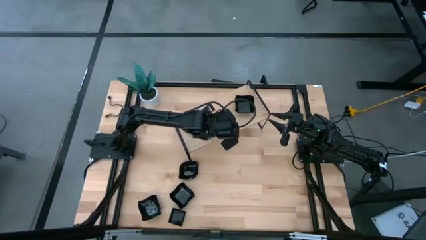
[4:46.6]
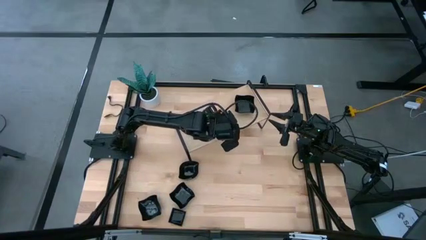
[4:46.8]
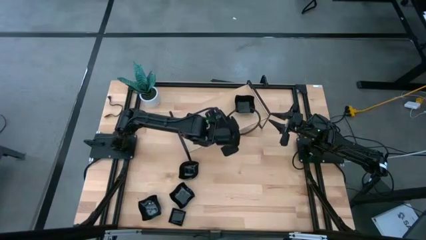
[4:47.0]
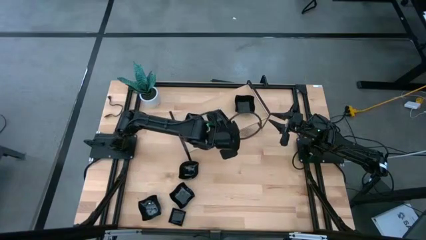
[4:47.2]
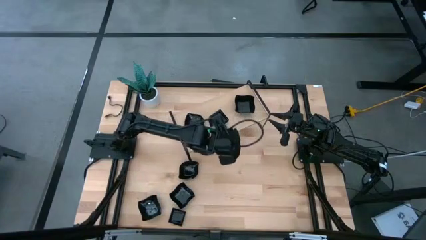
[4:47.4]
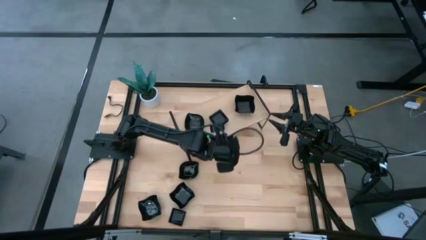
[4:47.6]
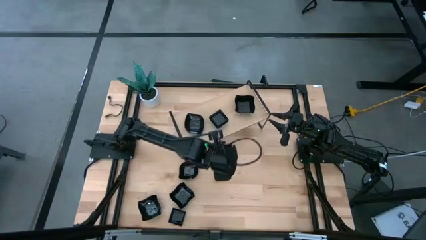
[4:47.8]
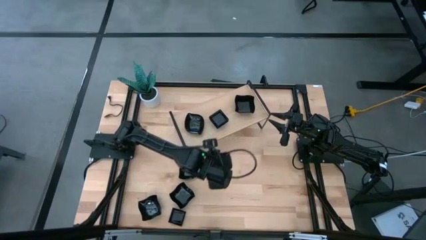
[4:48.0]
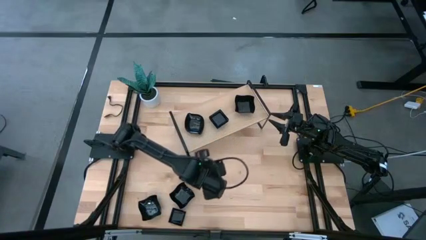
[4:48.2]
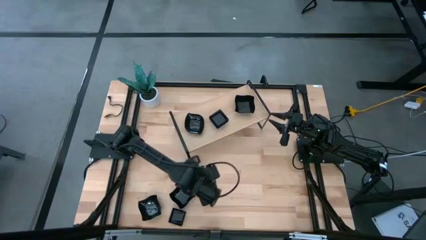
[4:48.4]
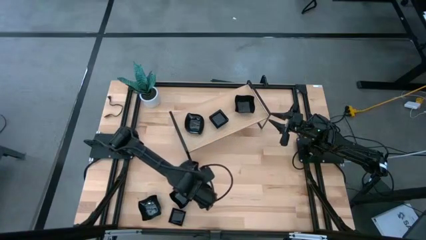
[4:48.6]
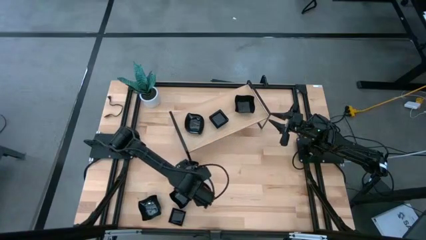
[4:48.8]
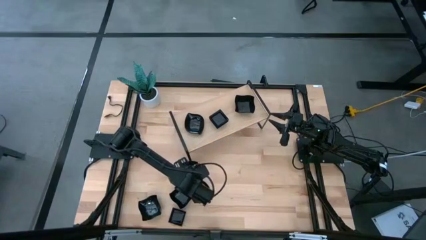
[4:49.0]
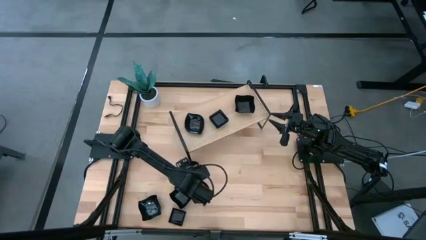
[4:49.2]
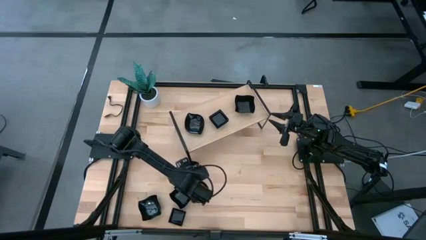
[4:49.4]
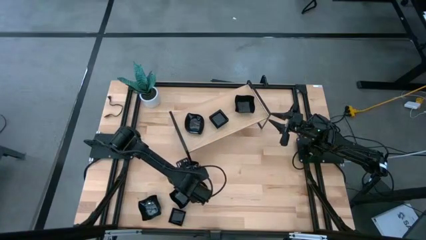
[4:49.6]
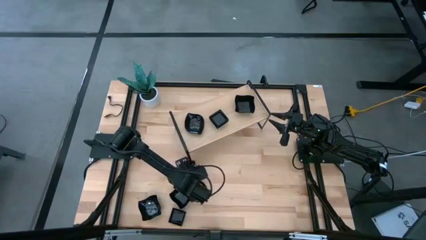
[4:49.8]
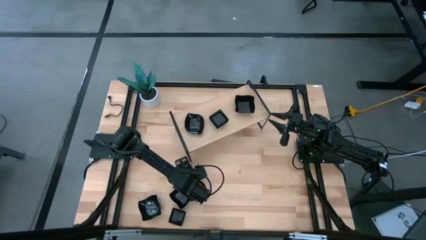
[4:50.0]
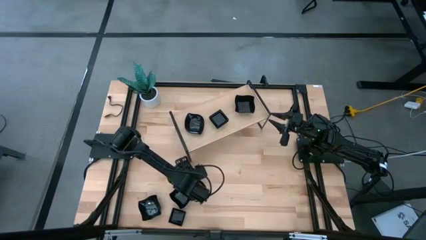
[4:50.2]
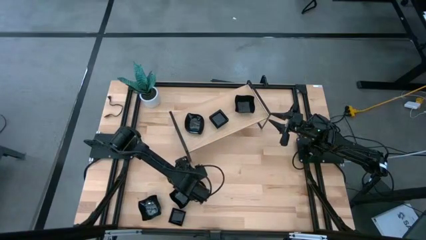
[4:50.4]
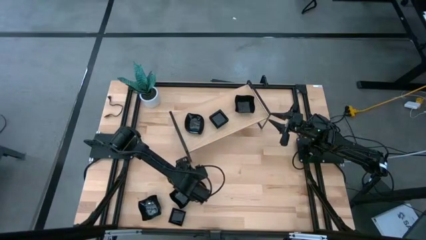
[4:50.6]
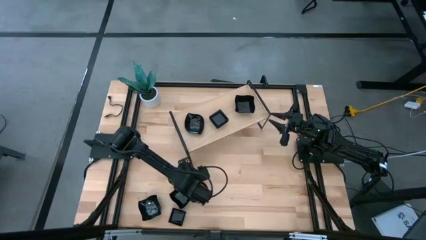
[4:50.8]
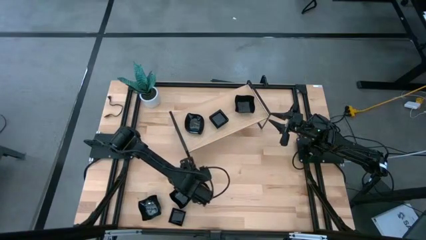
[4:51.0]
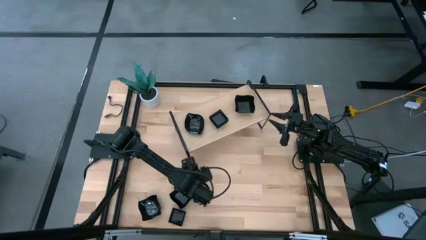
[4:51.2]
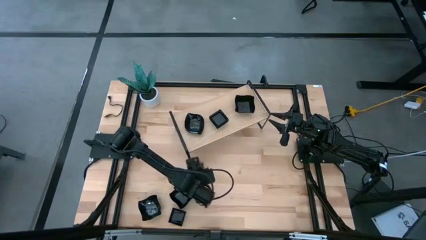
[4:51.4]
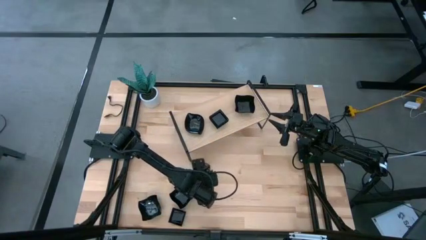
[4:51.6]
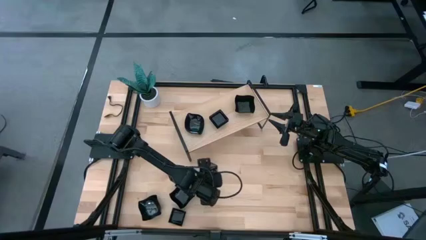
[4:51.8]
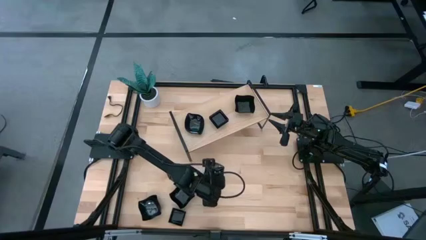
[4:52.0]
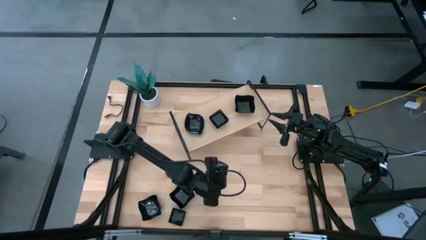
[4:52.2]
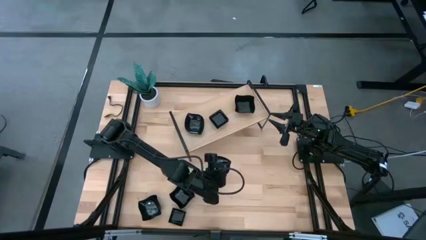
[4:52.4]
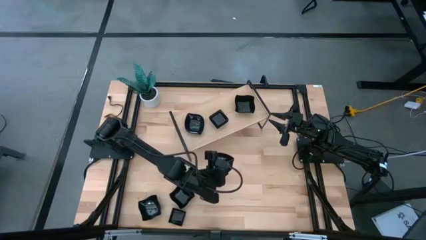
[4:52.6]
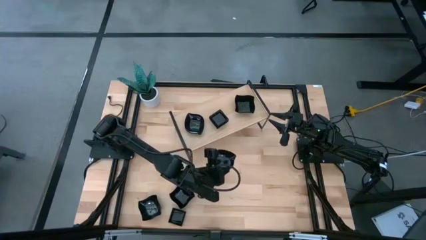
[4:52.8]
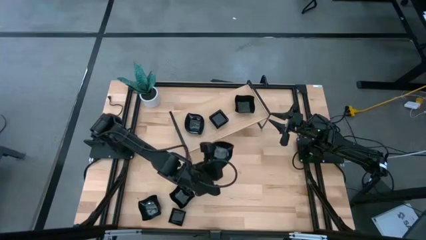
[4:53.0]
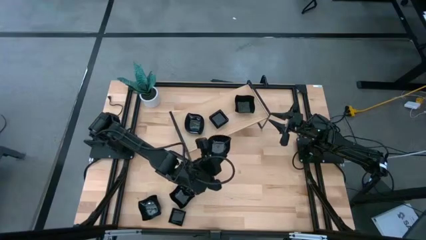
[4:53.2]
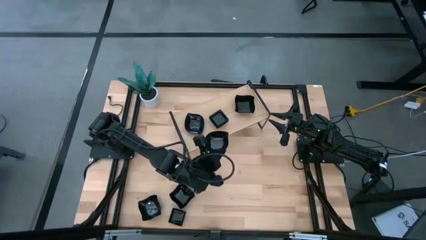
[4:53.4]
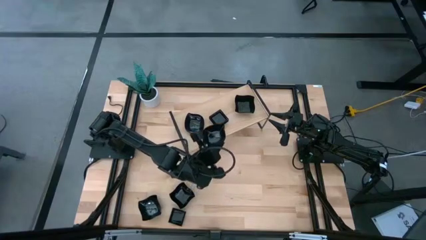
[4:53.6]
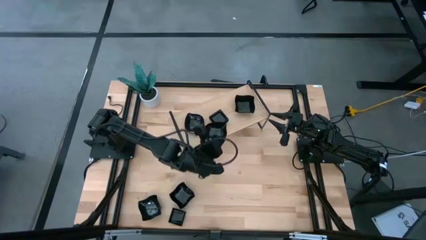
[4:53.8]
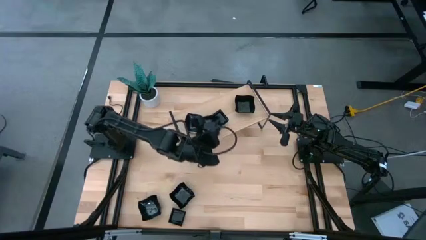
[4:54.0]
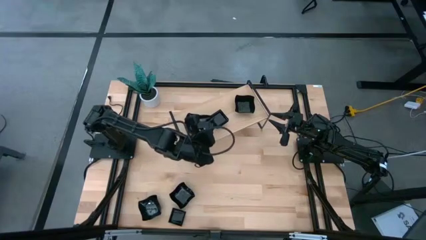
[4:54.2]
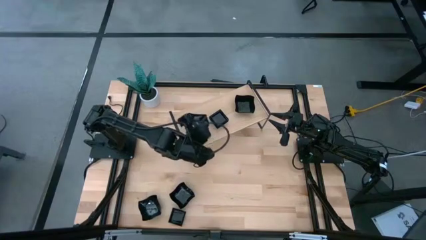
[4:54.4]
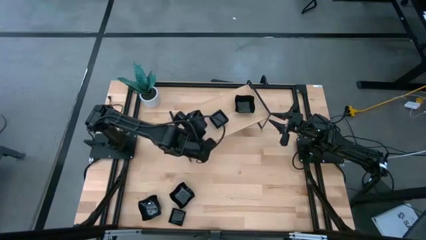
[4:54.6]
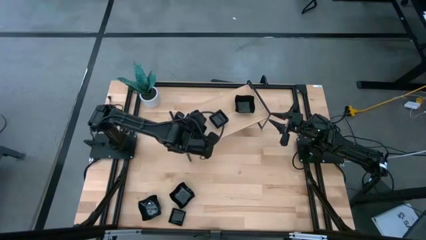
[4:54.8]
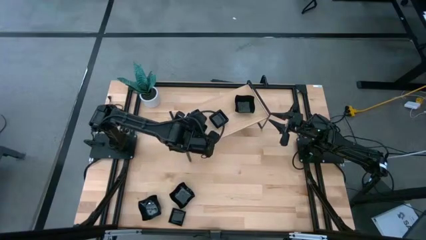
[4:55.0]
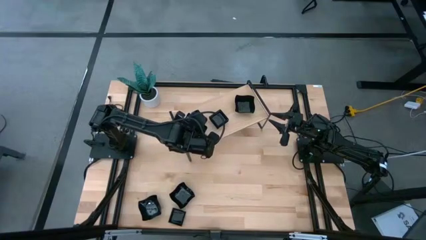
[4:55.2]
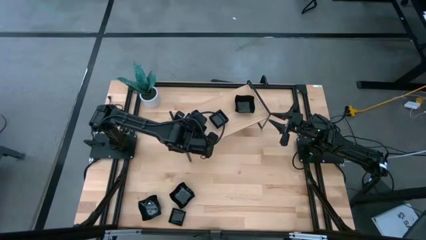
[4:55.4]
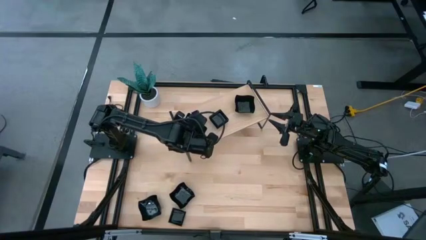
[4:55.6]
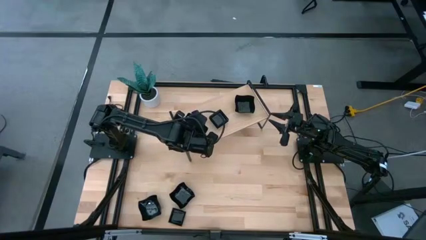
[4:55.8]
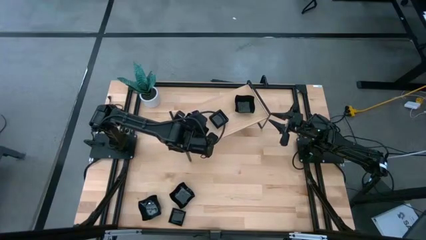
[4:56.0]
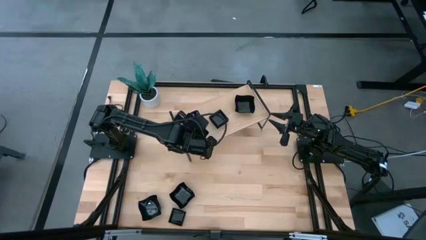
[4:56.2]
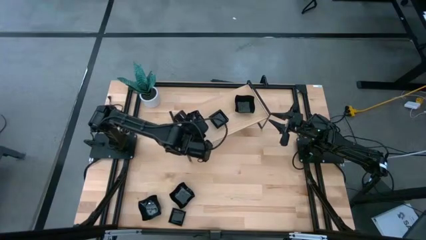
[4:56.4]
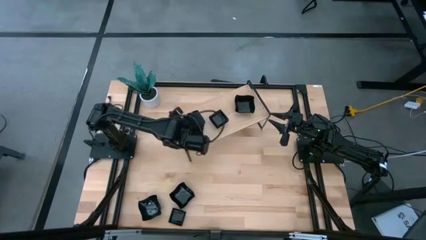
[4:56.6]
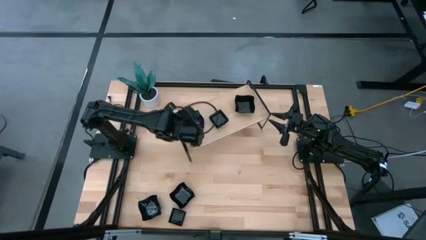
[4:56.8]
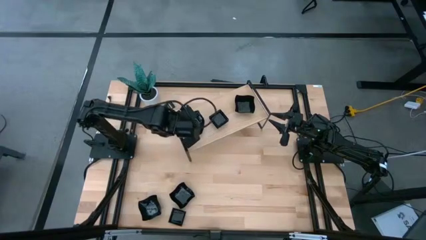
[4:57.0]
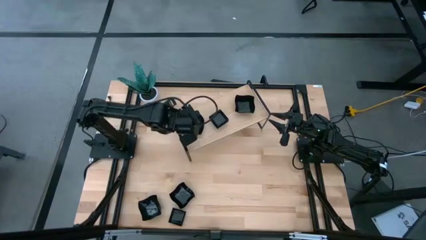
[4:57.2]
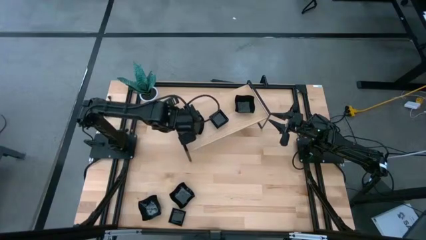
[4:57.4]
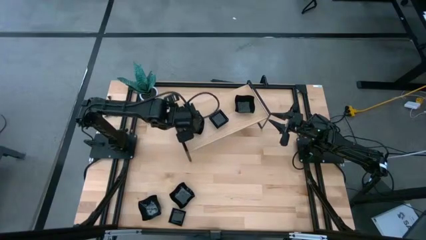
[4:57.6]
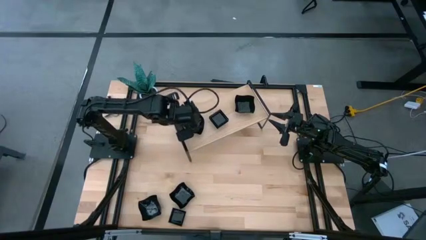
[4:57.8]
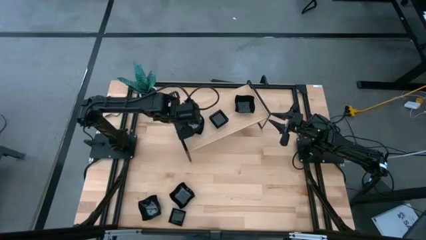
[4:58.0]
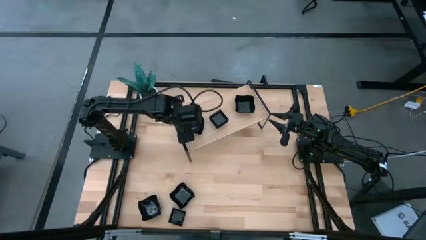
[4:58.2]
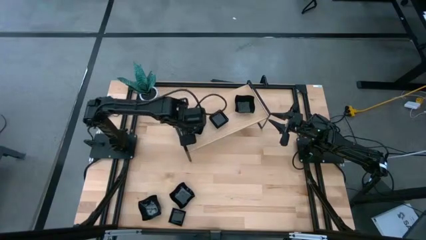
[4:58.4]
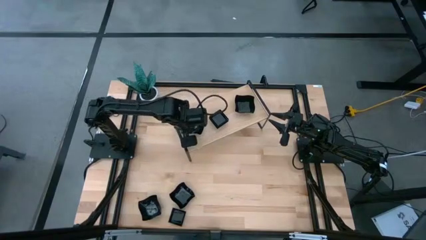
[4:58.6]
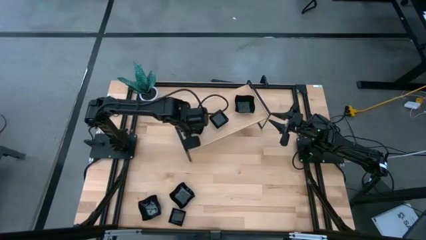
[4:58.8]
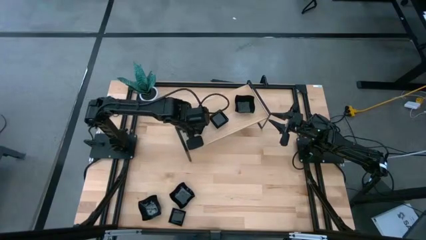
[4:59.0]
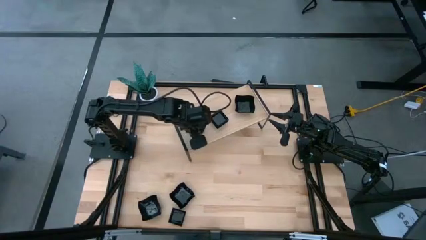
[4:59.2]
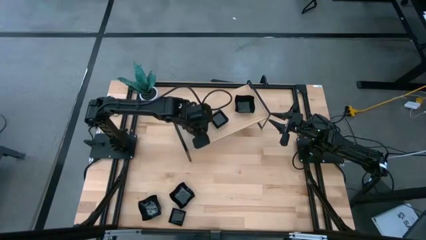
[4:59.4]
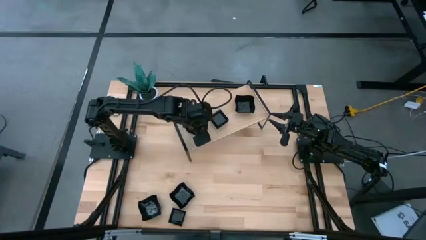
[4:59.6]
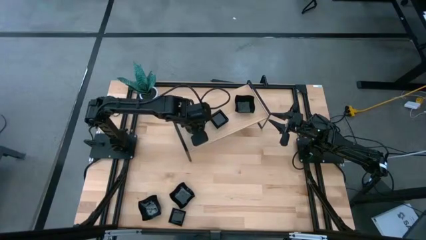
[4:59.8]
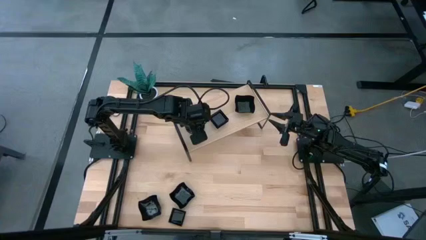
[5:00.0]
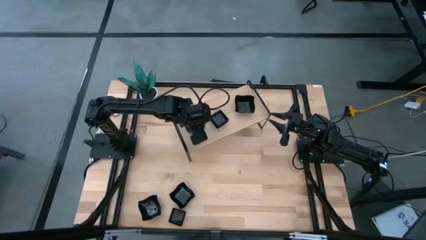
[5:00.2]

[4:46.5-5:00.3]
Task: Pick & Place Mini shaped plates
Stack the black leaf-shaped plate on top of the black leaf-shaped plate on the shelf

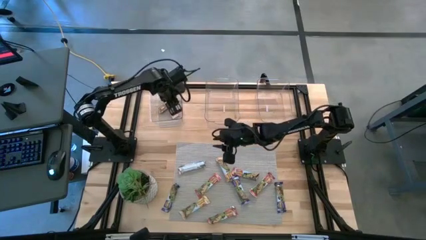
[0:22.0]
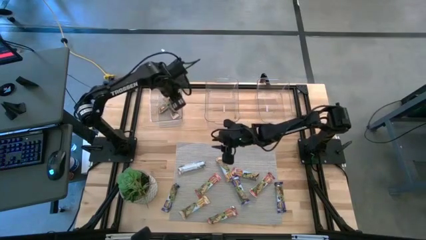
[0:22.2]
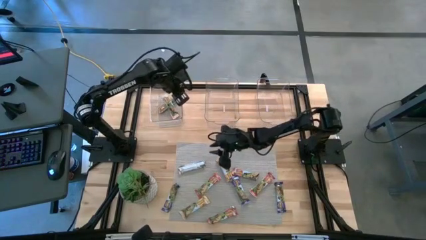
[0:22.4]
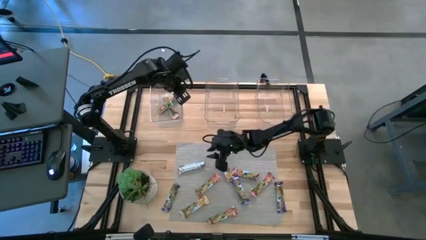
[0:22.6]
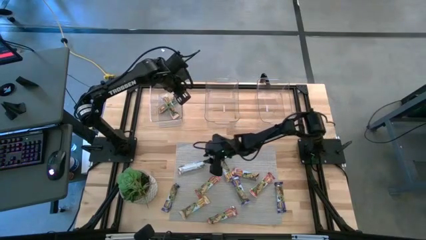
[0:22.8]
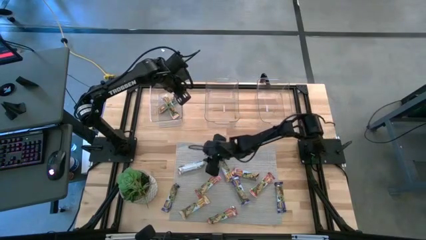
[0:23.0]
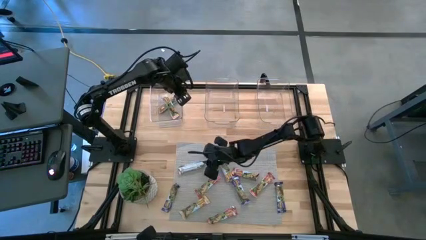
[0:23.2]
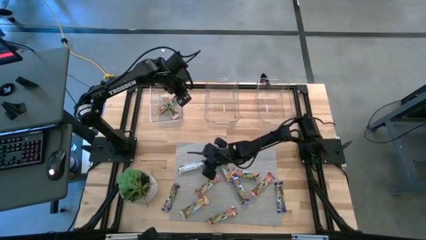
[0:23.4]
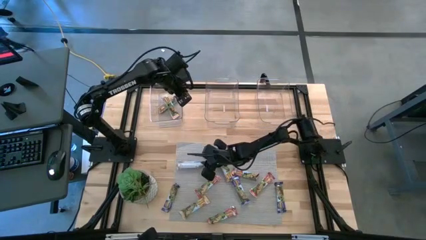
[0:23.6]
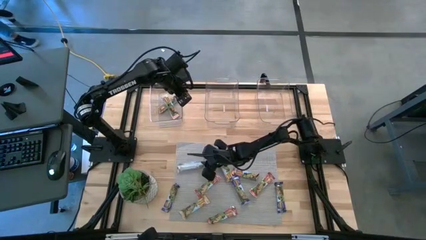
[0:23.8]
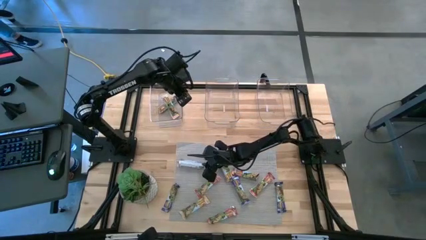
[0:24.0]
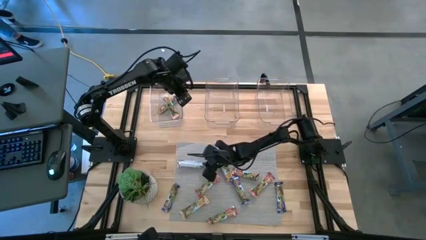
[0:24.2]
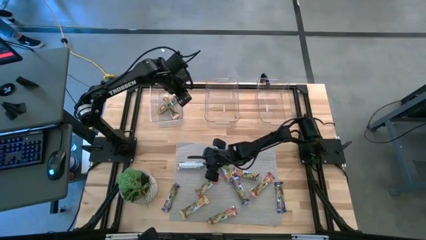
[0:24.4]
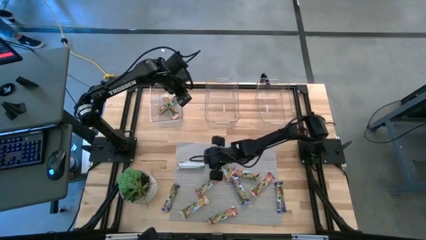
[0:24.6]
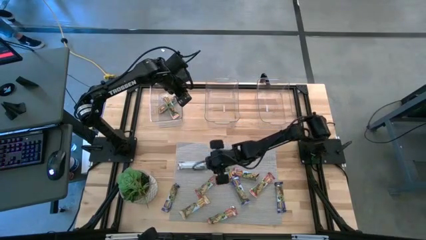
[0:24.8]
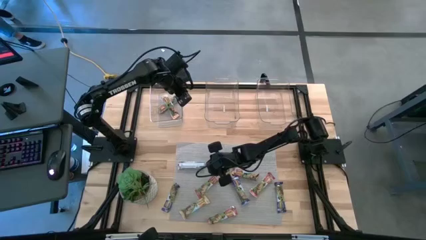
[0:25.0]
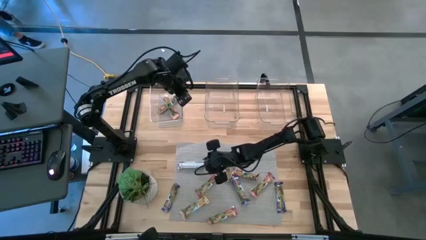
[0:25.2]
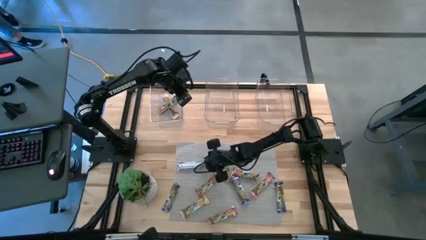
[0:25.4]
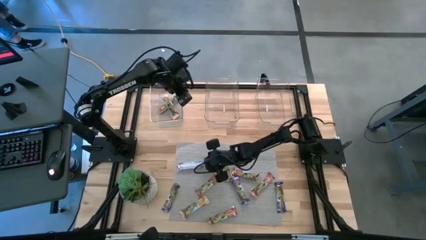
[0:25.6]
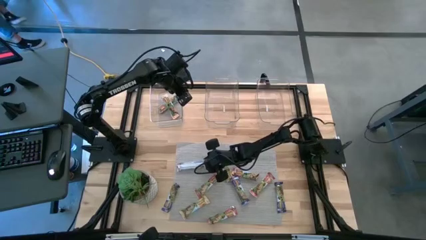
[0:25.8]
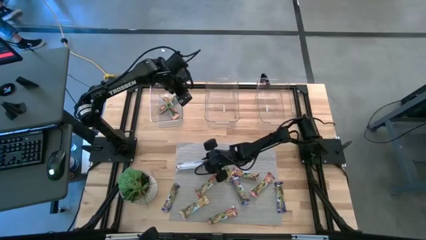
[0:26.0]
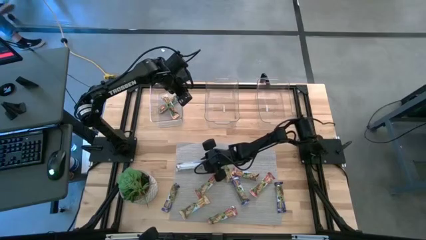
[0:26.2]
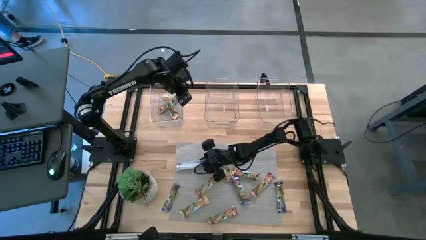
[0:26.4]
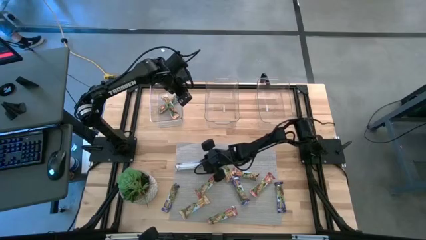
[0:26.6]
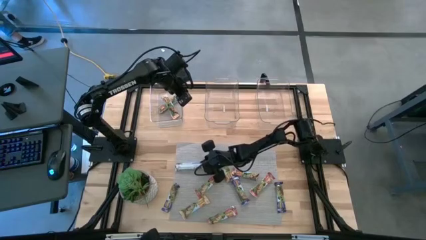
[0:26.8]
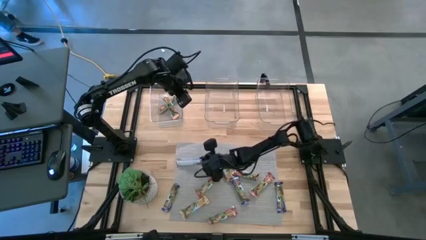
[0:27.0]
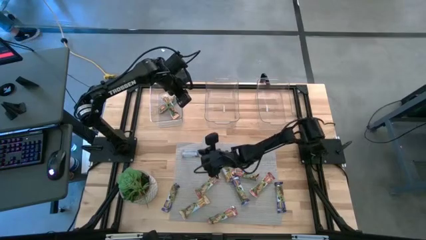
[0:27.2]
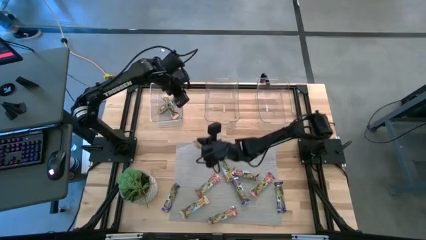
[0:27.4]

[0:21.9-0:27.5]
Task: Pick and place Granola Bars by type
Put the top left yellow granola bar into the left transparent bin
